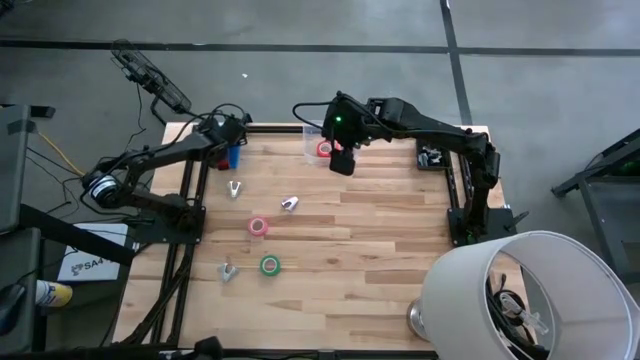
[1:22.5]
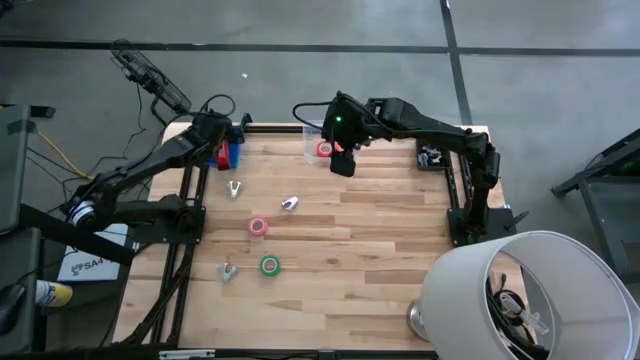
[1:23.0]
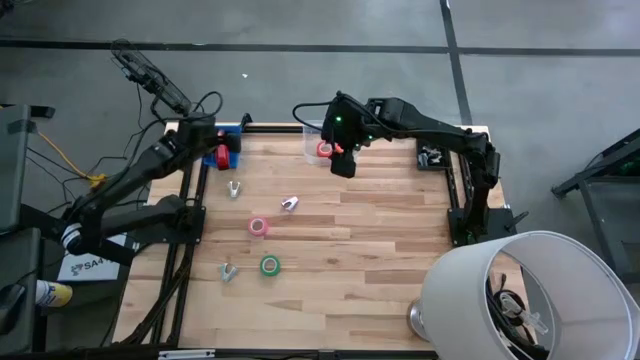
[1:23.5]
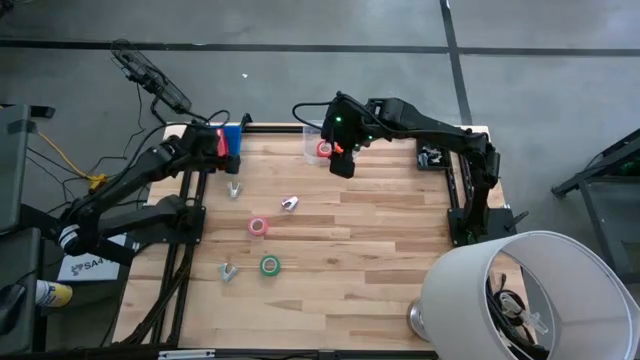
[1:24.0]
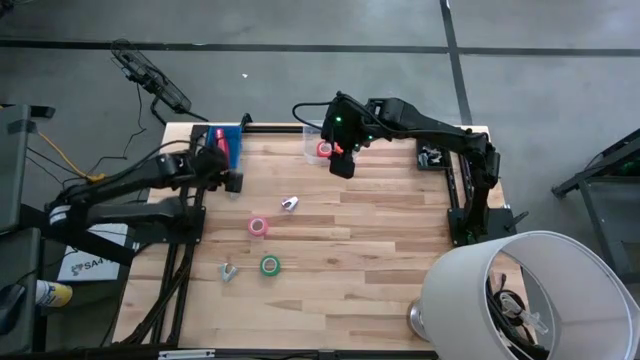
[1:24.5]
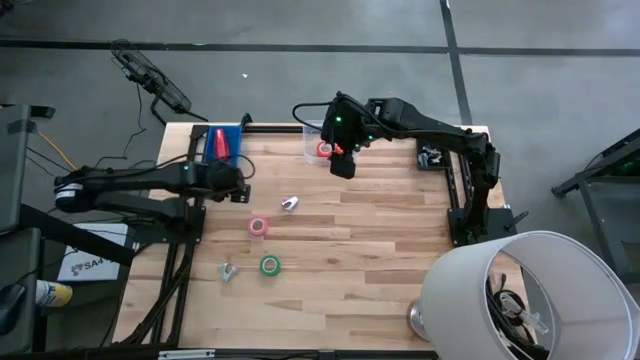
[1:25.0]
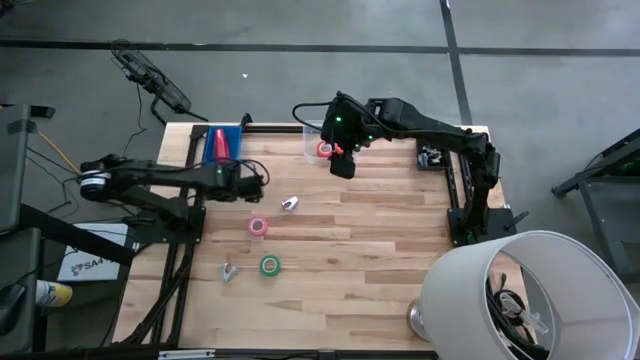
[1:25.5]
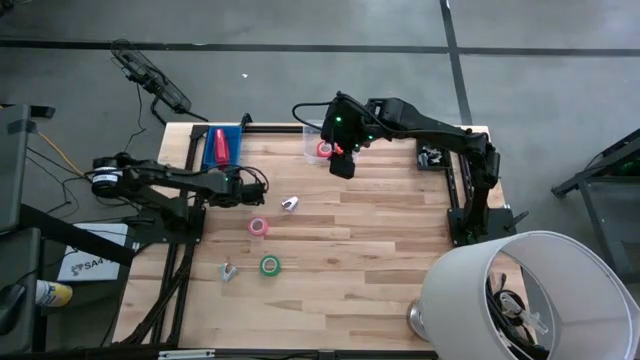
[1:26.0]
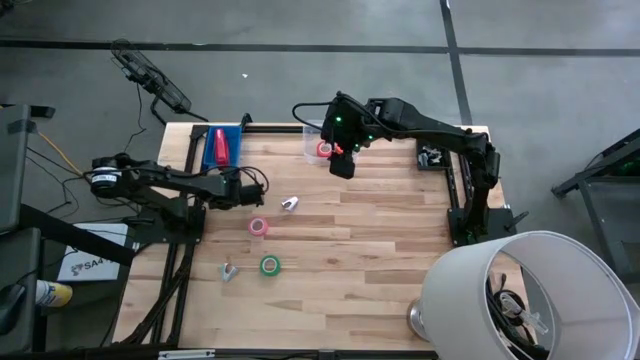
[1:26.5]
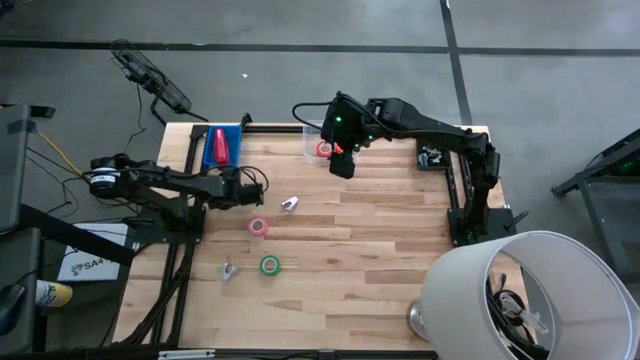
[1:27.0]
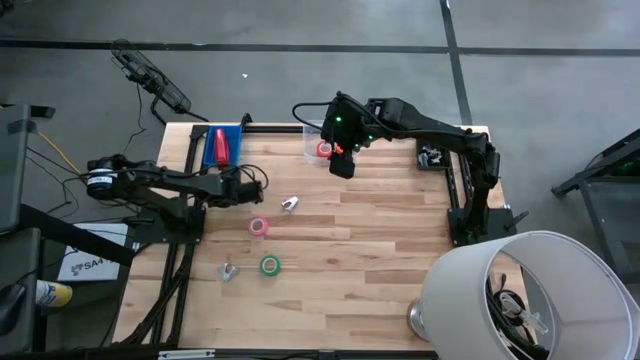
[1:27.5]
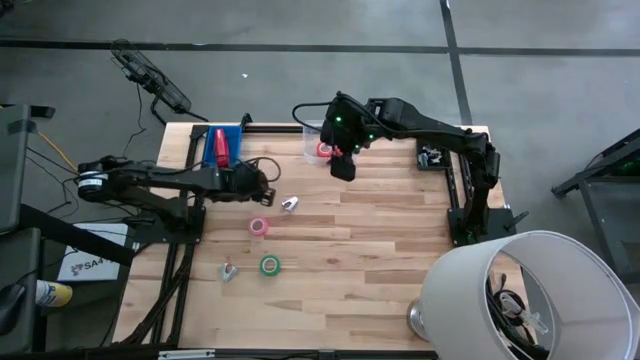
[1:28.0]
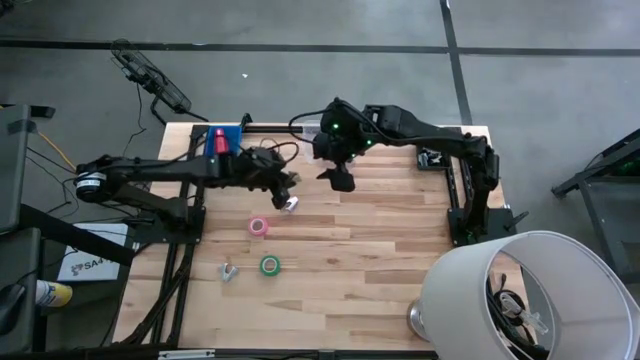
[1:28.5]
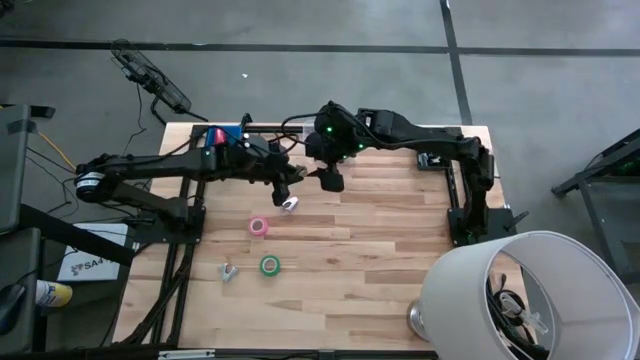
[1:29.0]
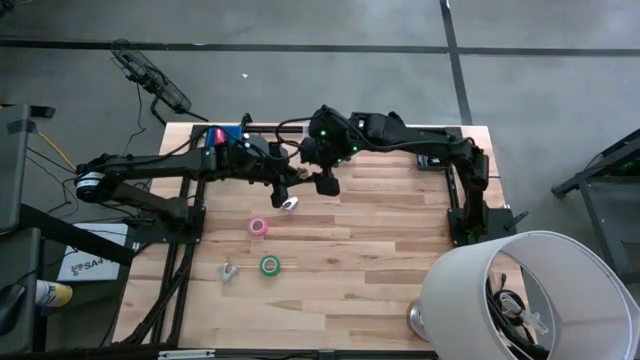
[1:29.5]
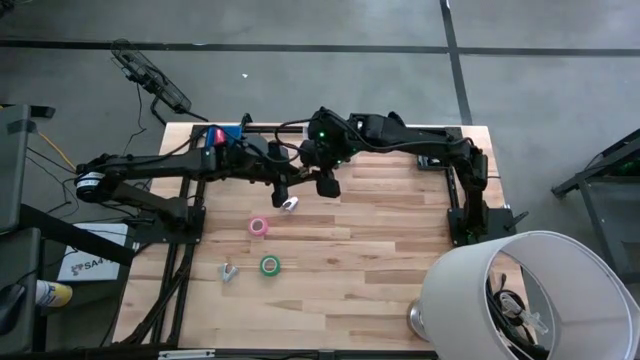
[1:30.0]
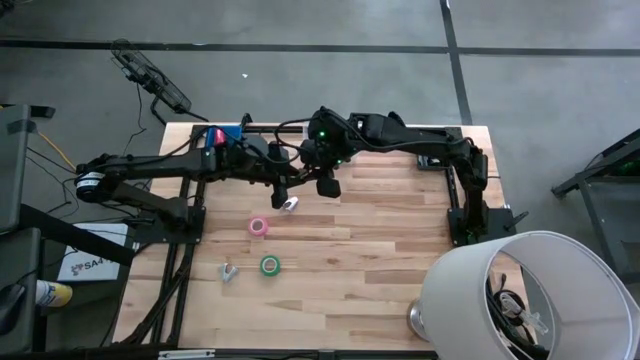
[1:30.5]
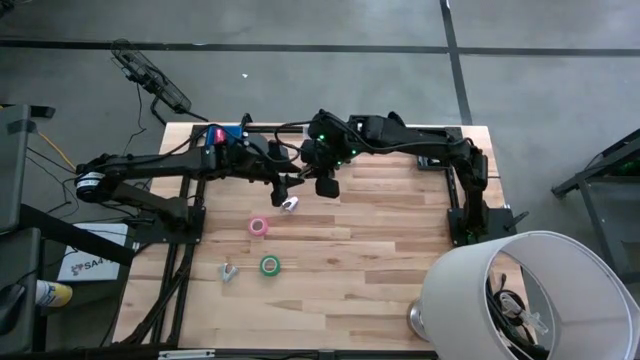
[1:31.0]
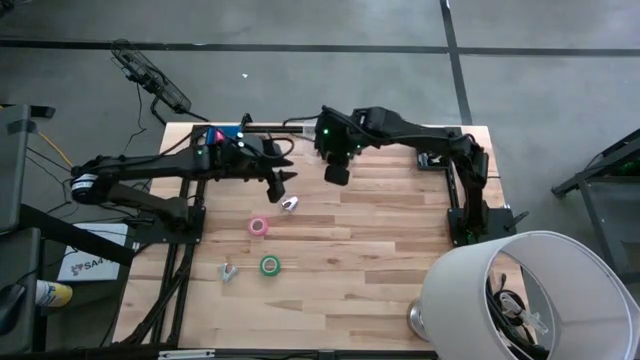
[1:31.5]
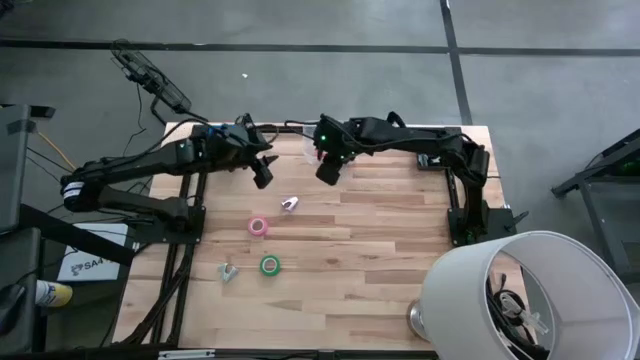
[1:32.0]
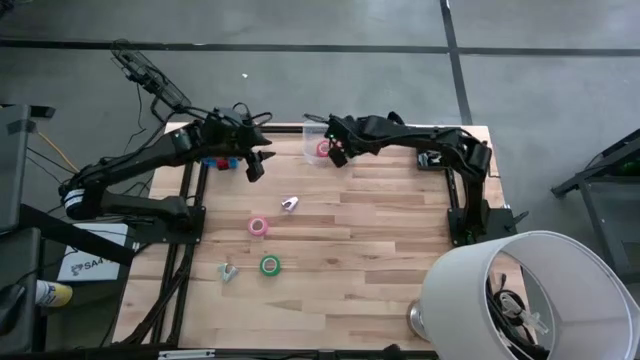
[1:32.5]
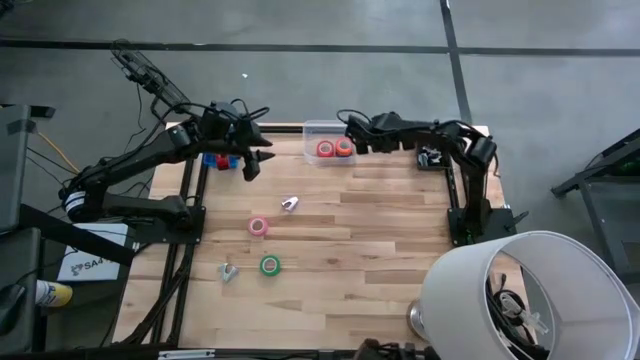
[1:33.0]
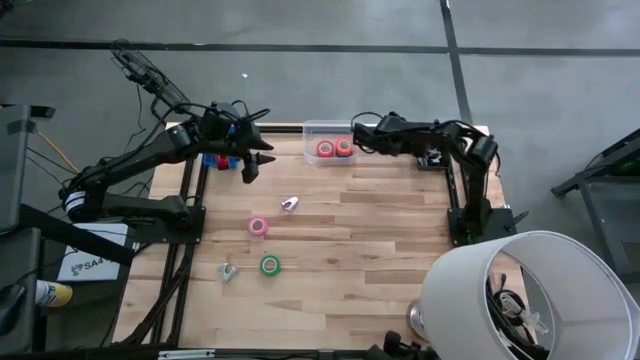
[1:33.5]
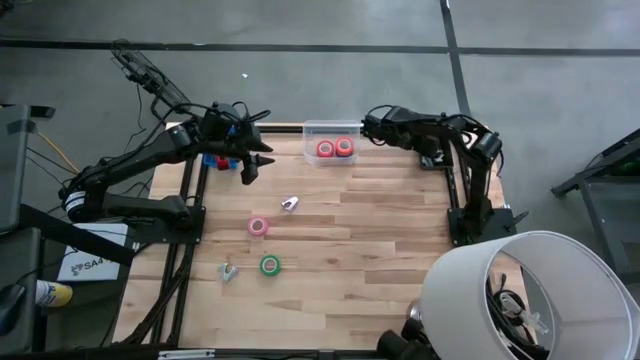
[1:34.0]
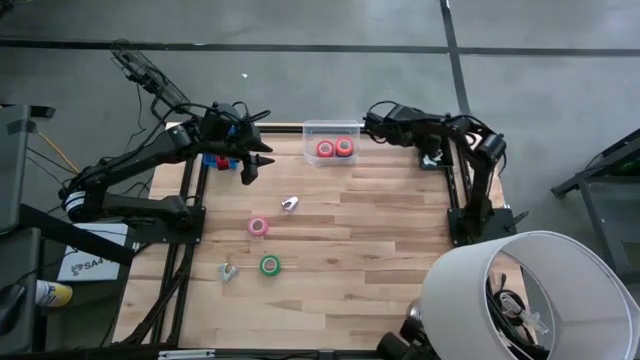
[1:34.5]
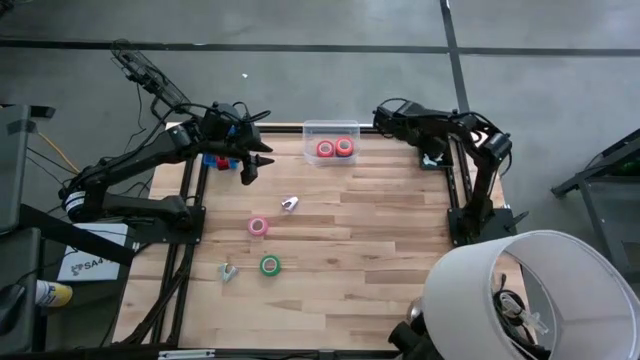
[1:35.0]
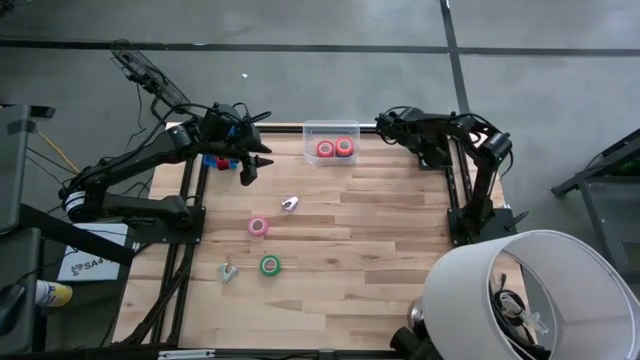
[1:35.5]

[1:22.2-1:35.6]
Task: Pick and place Stapler, Stapler remover, tape
Put the gray staple remover into the black bin

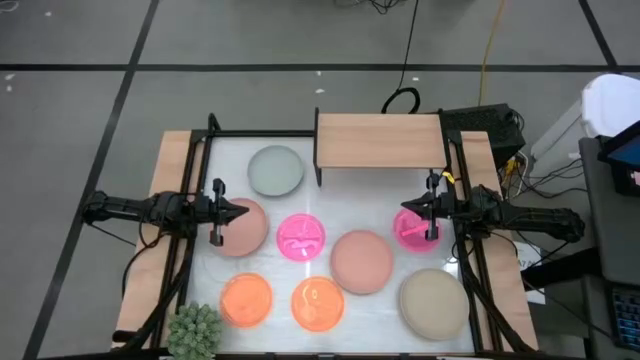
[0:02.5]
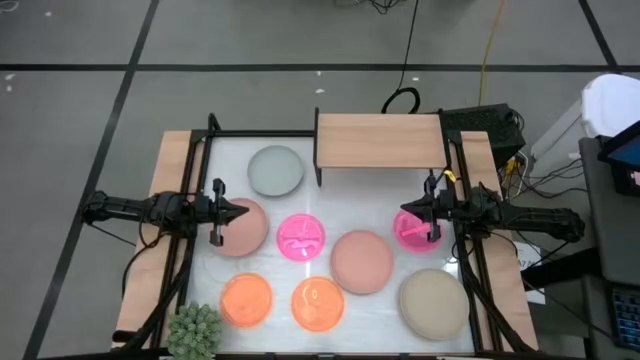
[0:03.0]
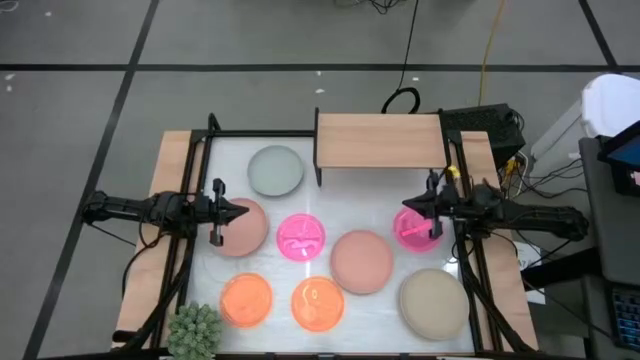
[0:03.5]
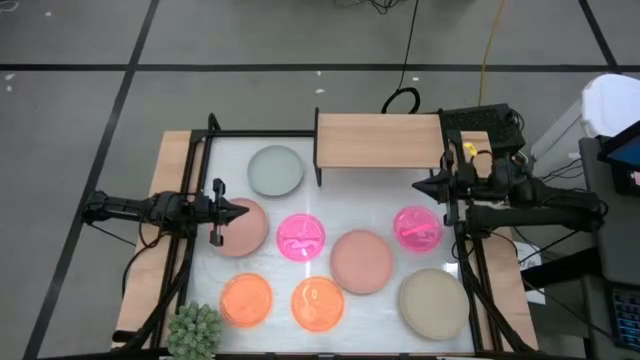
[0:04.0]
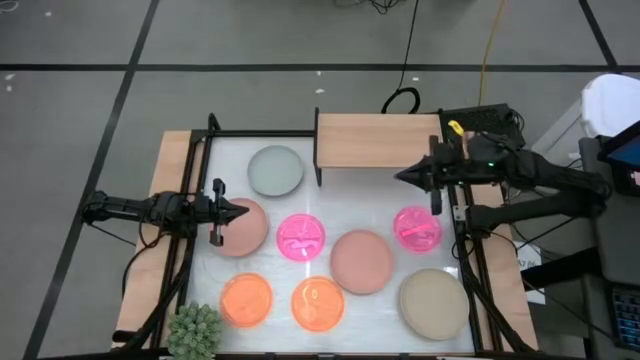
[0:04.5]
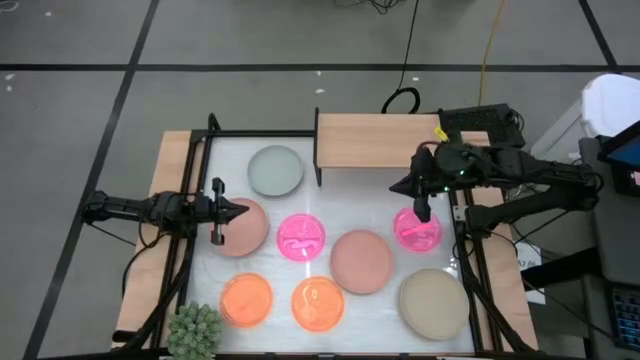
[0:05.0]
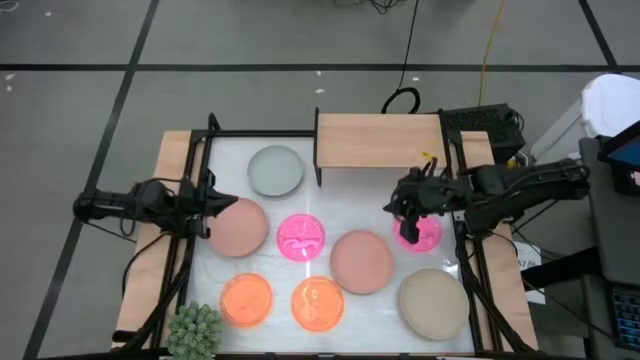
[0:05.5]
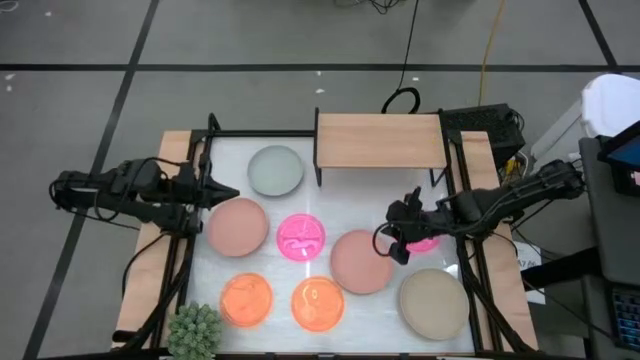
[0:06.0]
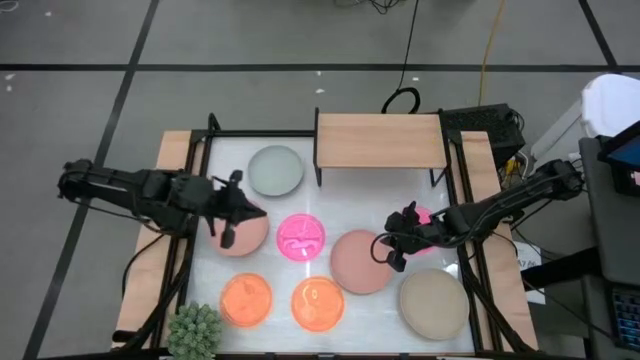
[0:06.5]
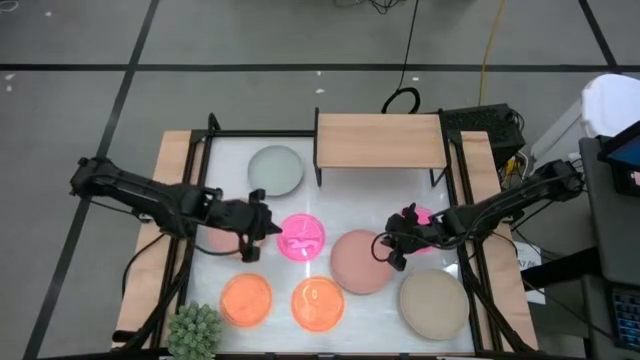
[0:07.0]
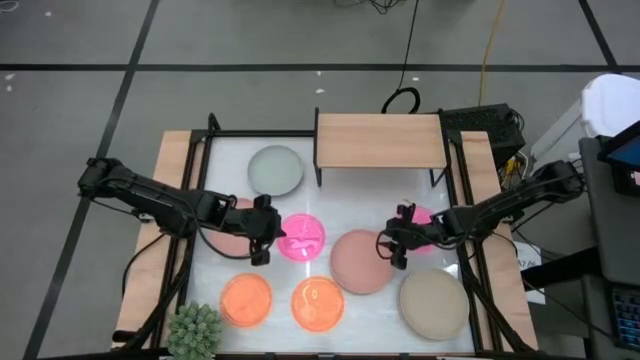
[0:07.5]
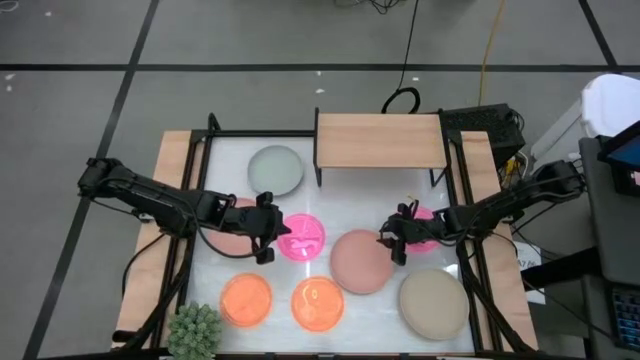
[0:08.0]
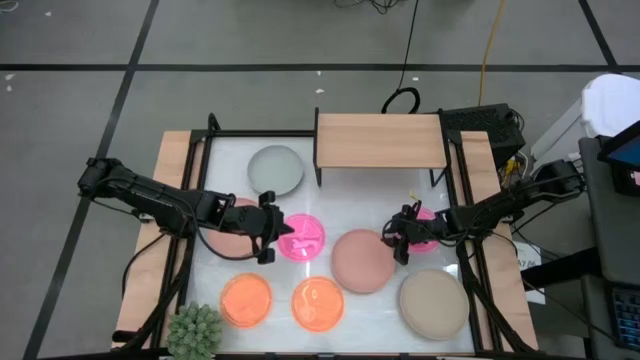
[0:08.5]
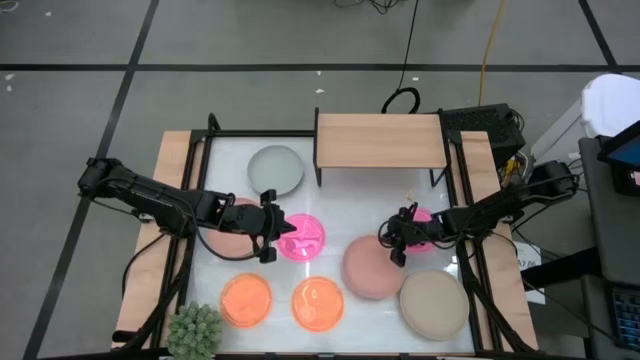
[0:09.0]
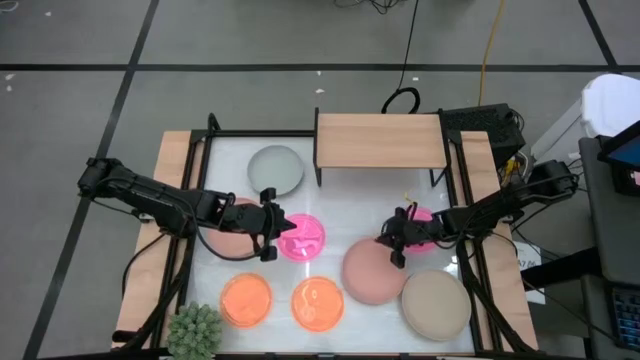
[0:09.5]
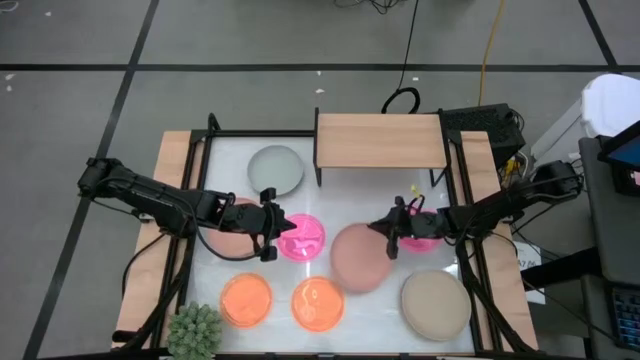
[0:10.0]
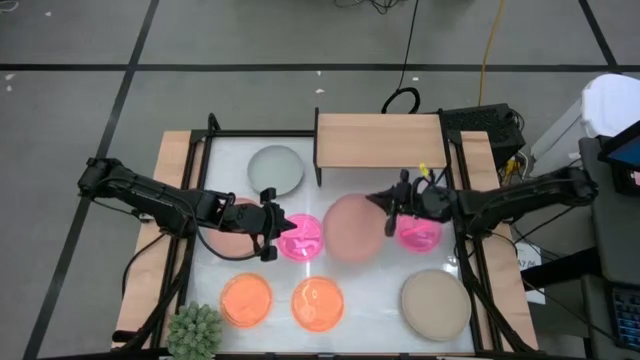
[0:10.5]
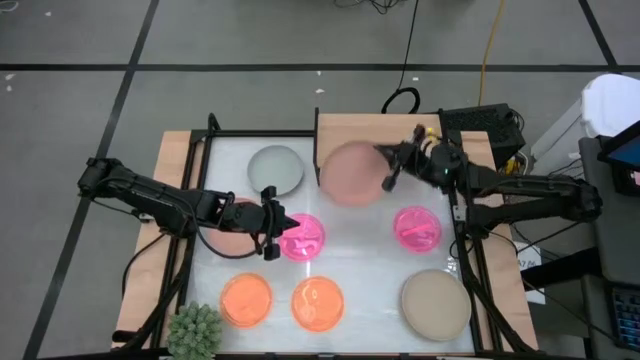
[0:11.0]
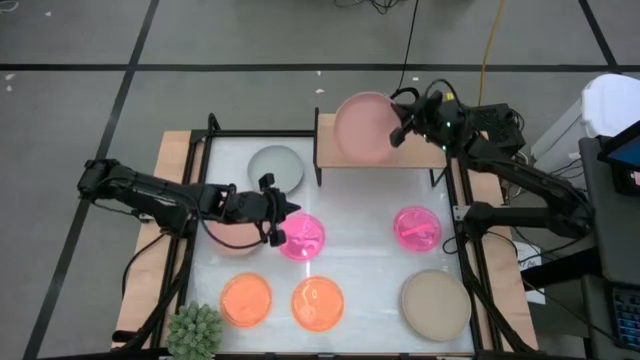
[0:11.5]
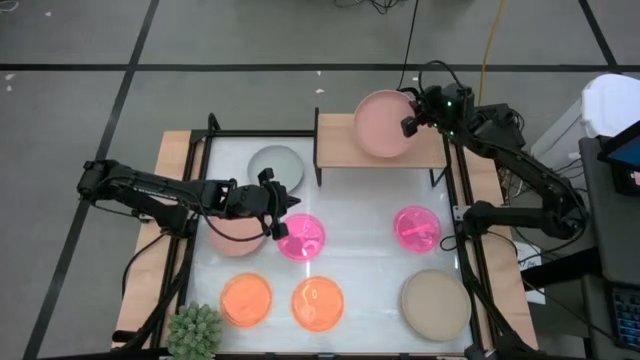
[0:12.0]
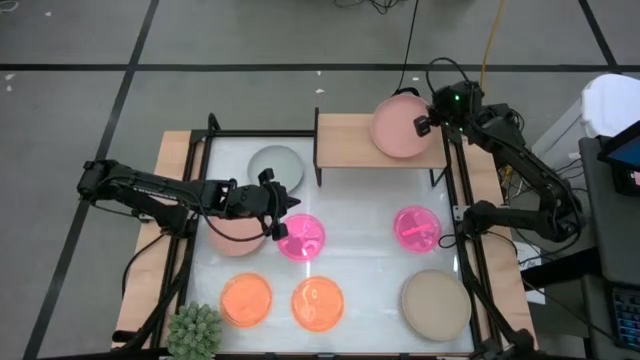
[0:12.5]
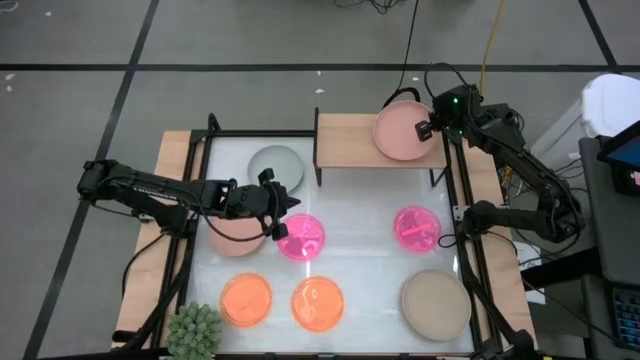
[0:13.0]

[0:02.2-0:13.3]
Task: Place and stack plates onto a shelf
Put the right dark pink plate on the shelf
